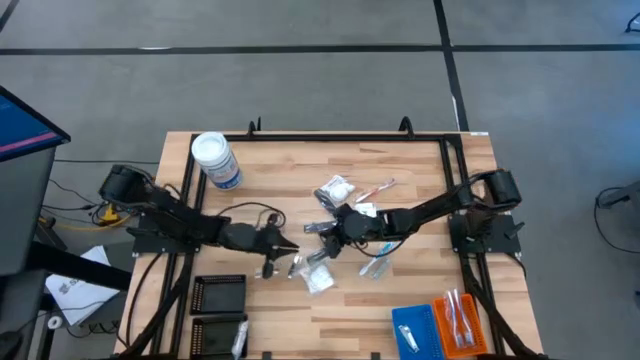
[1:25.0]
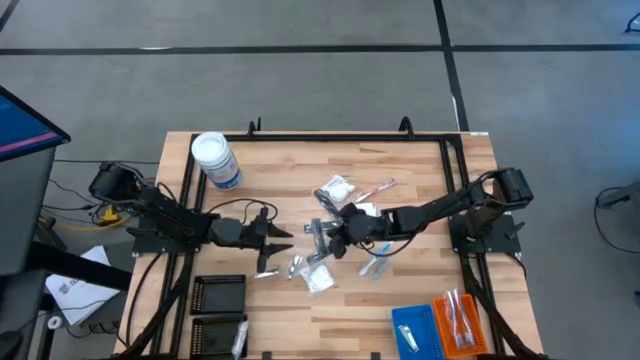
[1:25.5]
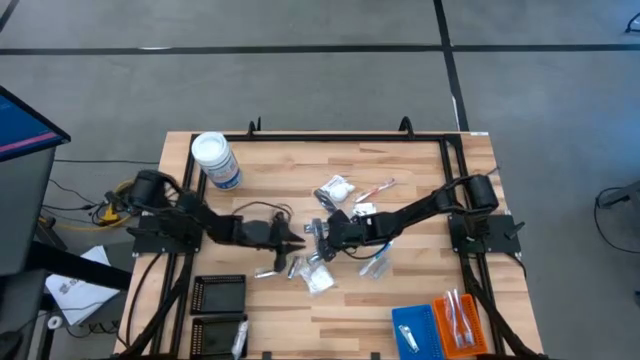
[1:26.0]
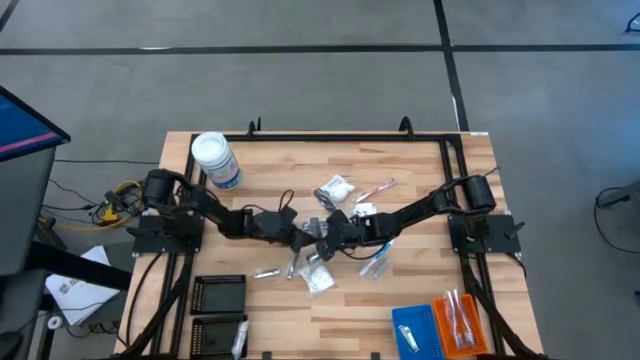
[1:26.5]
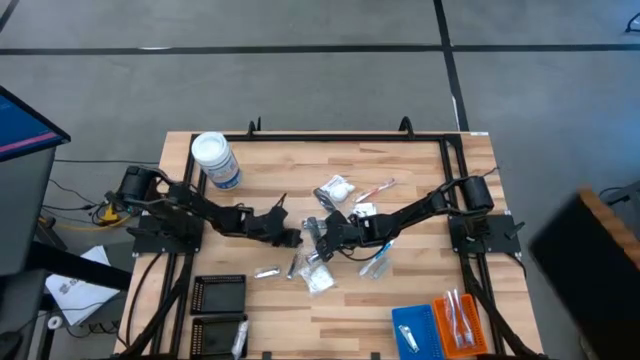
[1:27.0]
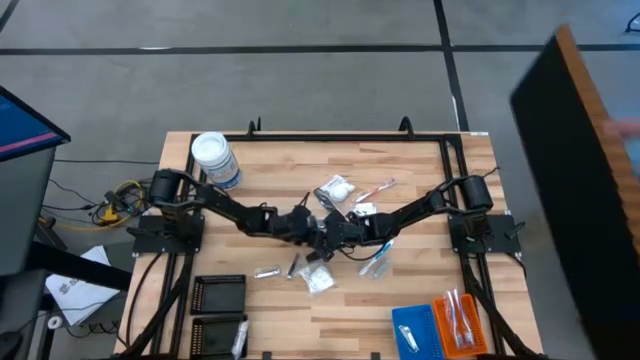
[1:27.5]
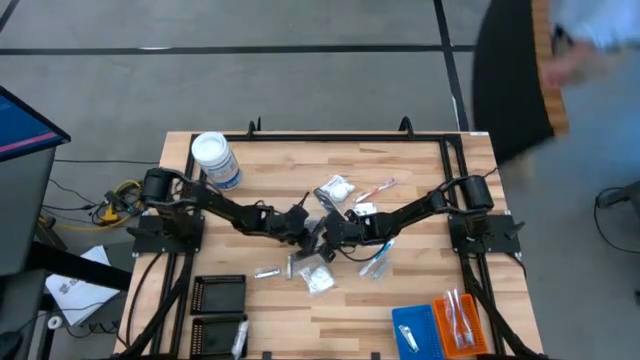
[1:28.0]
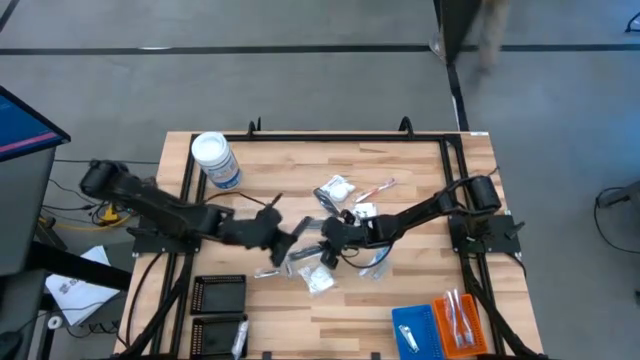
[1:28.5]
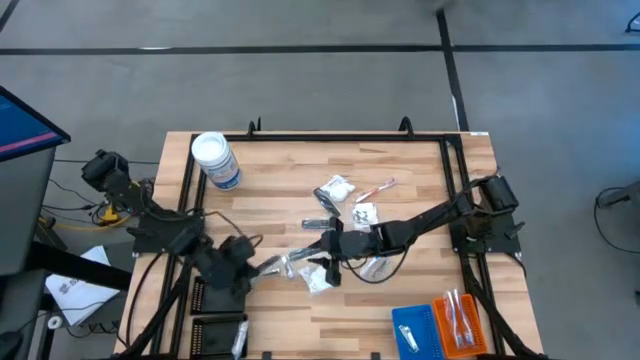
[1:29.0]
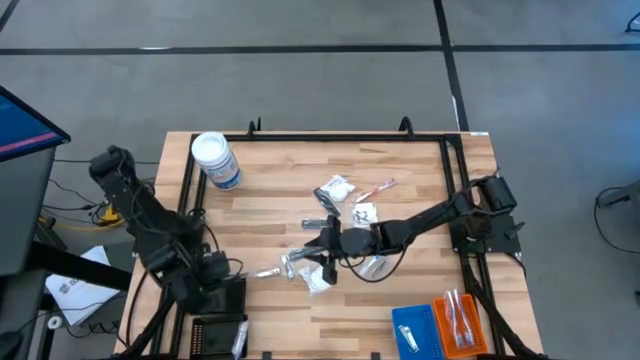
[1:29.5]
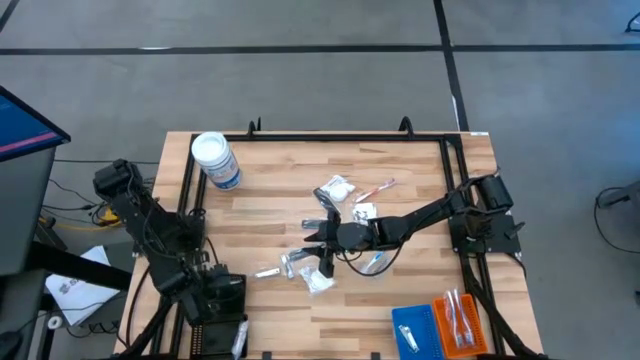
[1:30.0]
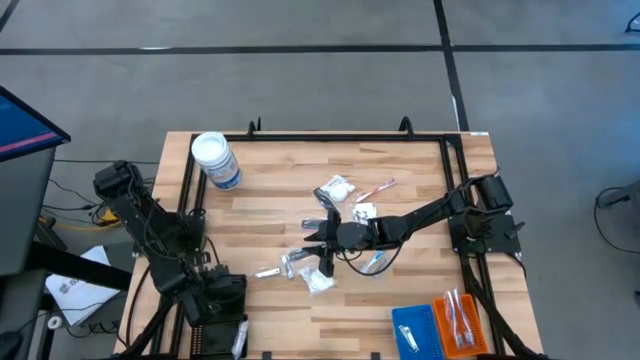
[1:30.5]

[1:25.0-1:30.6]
Task: Pick & Place Travel size toiletries
Put the black comb into the top black bin

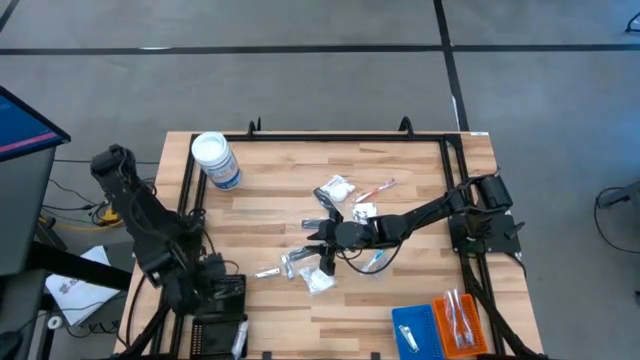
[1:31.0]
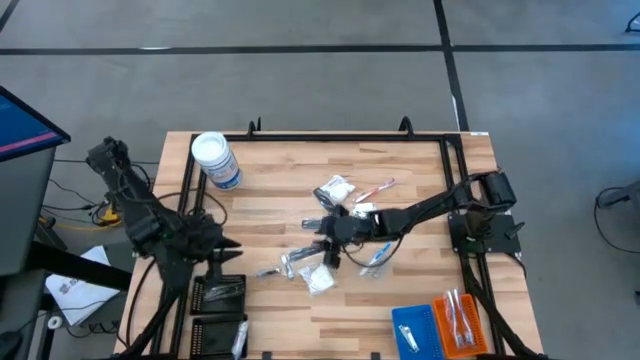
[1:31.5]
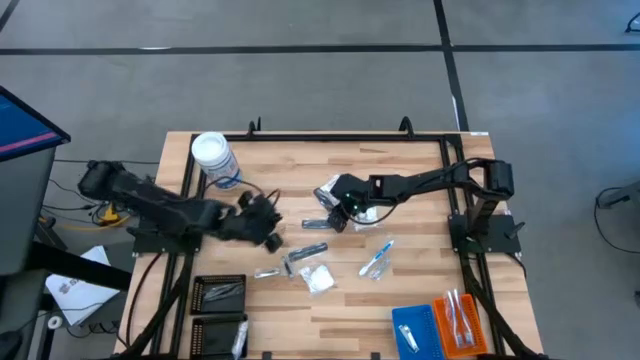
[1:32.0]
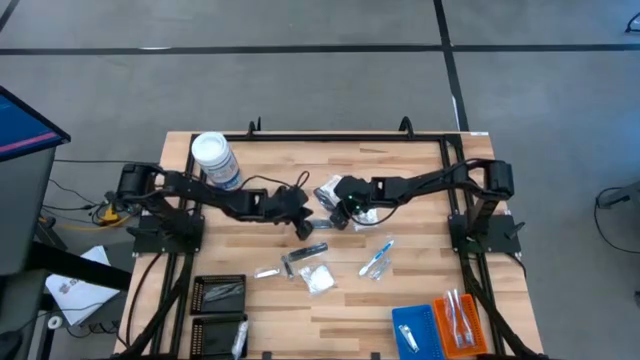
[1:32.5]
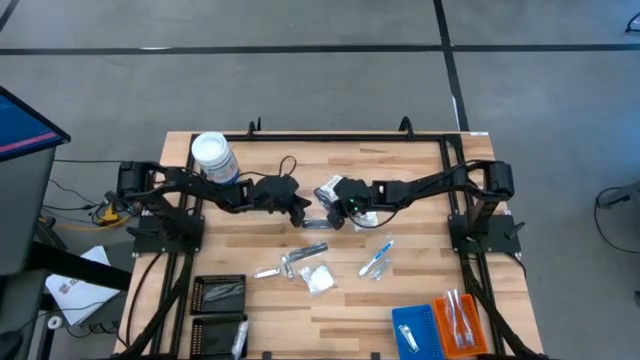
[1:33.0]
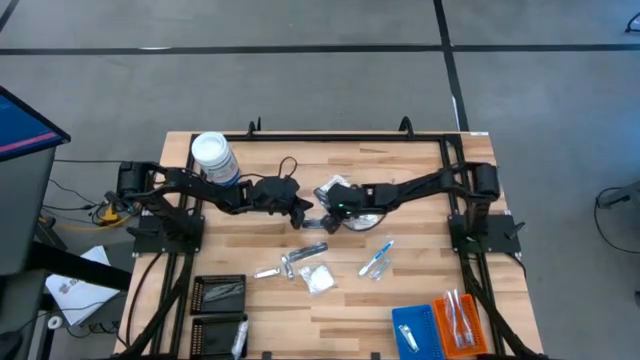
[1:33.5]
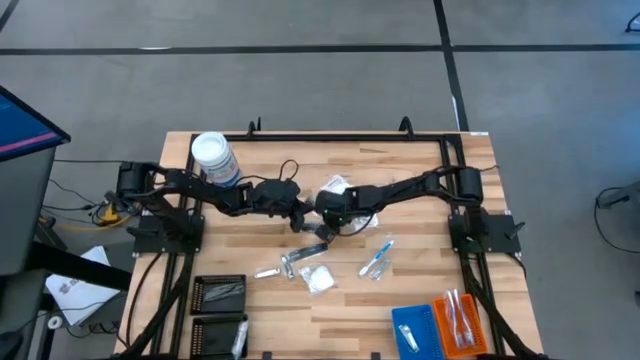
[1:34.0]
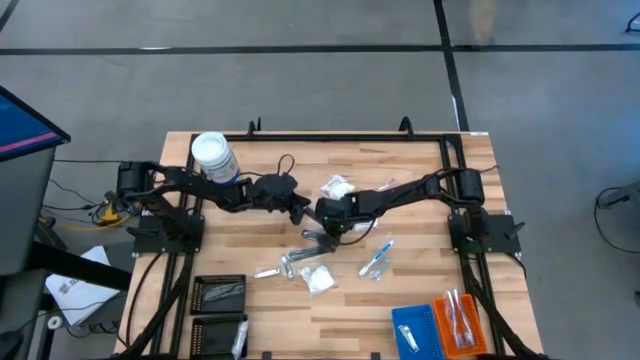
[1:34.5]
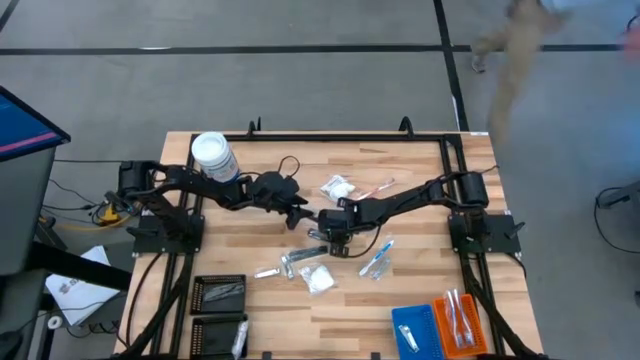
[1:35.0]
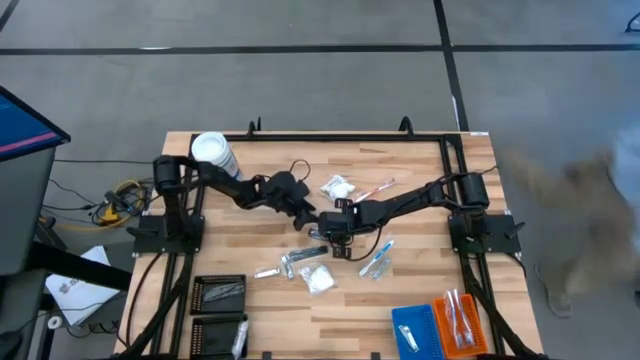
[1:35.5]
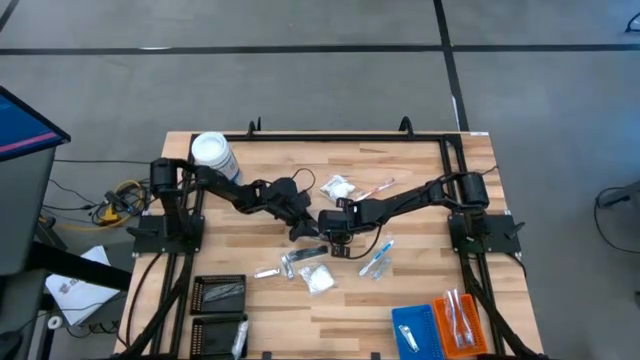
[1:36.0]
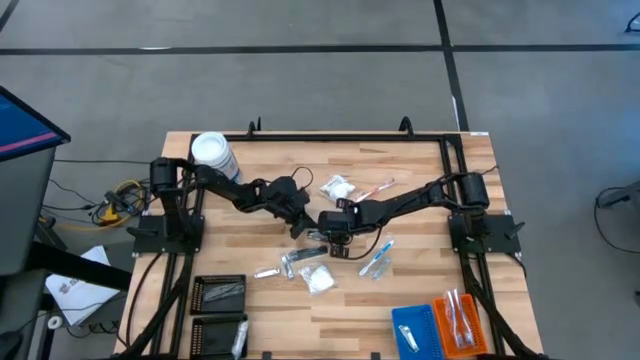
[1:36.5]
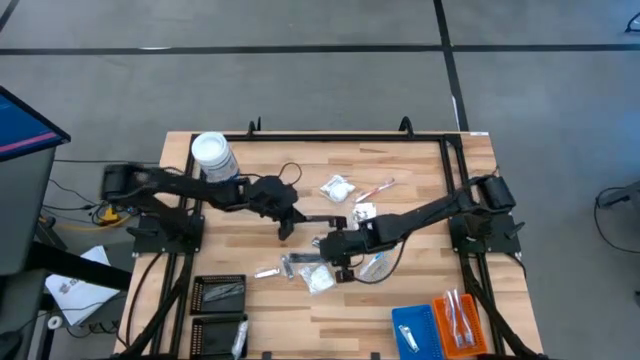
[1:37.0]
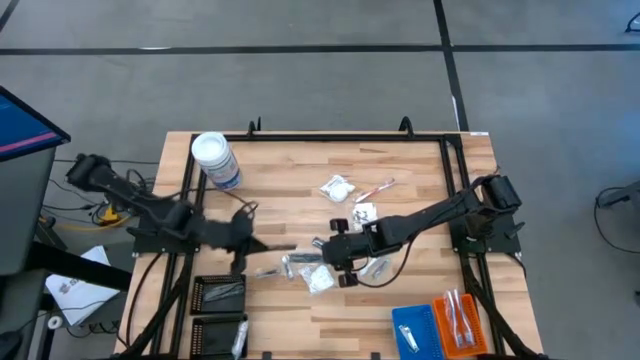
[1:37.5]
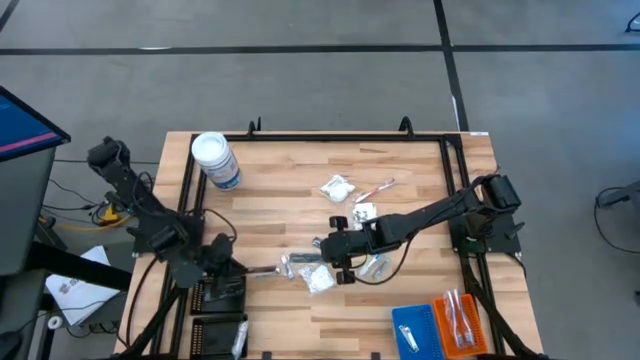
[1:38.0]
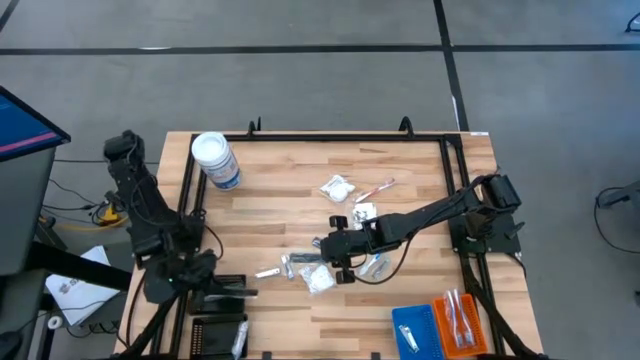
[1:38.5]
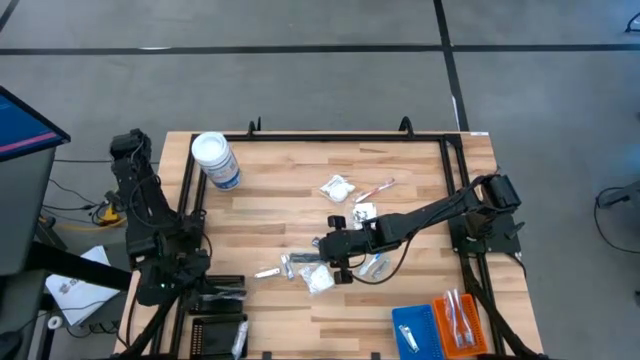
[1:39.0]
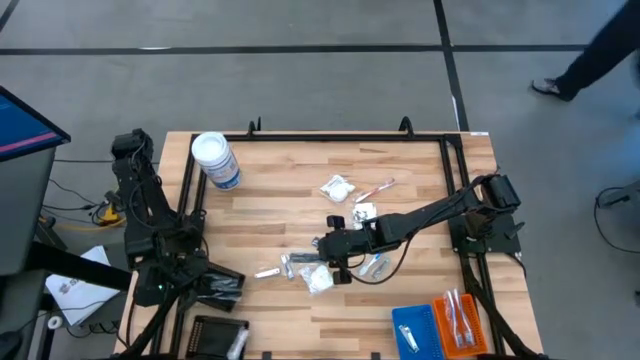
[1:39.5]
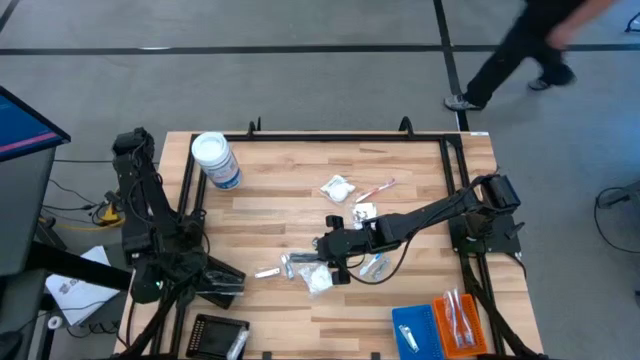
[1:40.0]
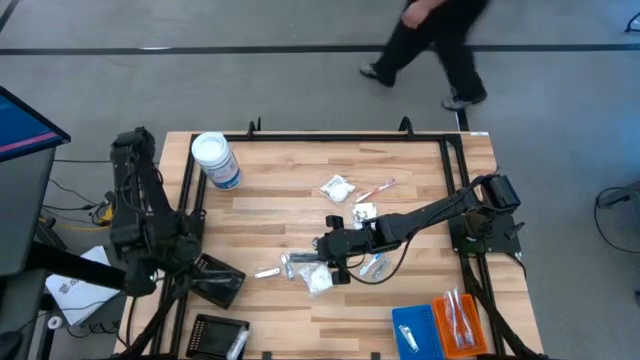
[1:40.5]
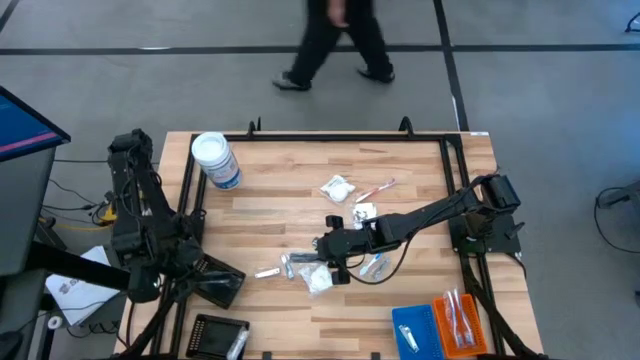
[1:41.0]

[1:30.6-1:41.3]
Put the black comb into the top black bin

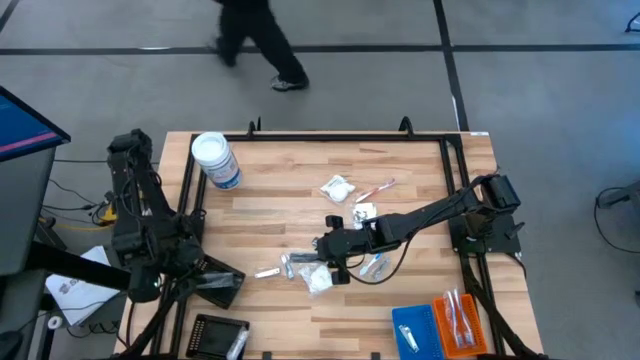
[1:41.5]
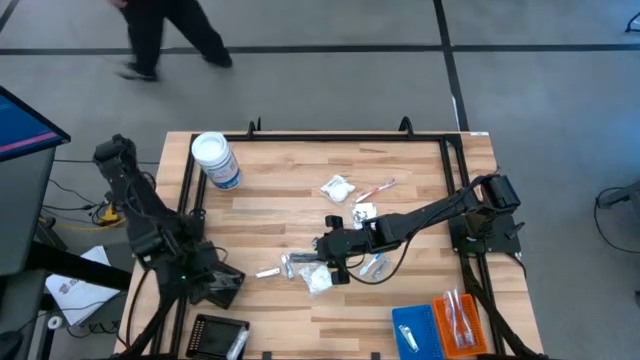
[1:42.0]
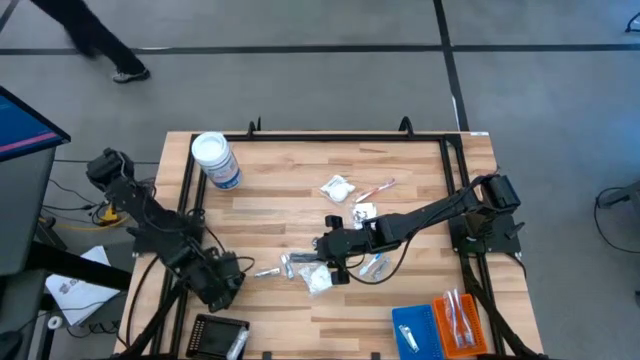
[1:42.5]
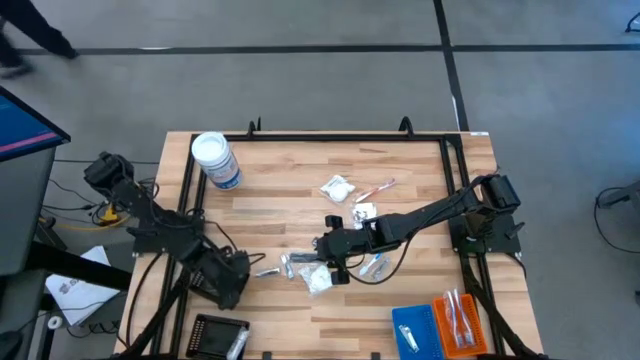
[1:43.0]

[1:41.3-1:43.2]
Adjust the top black bin

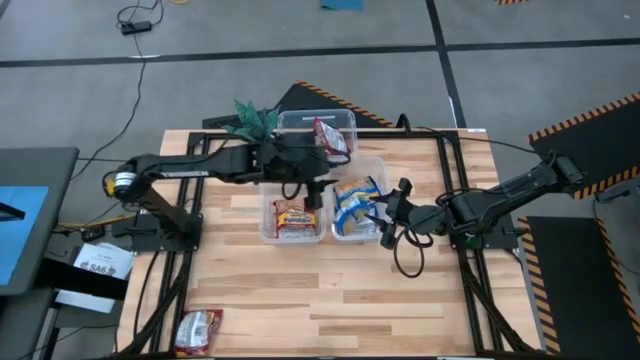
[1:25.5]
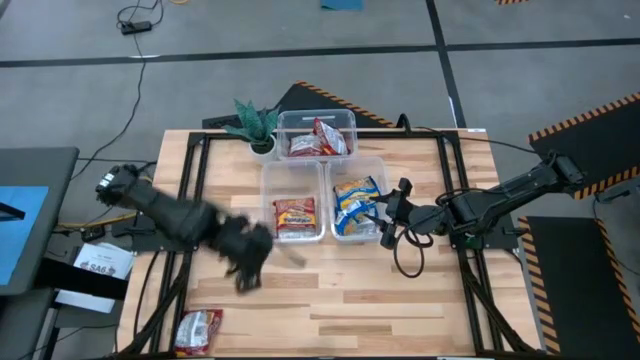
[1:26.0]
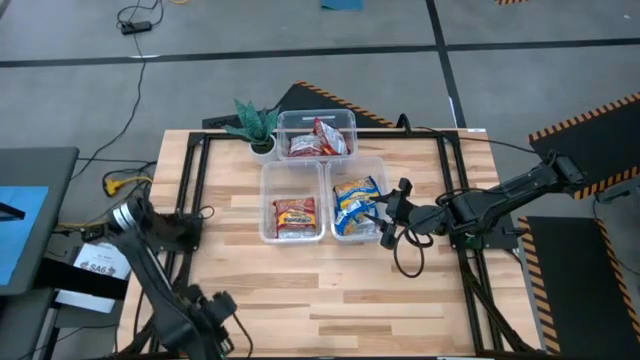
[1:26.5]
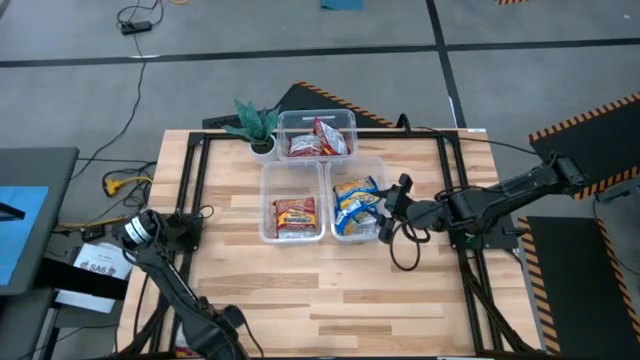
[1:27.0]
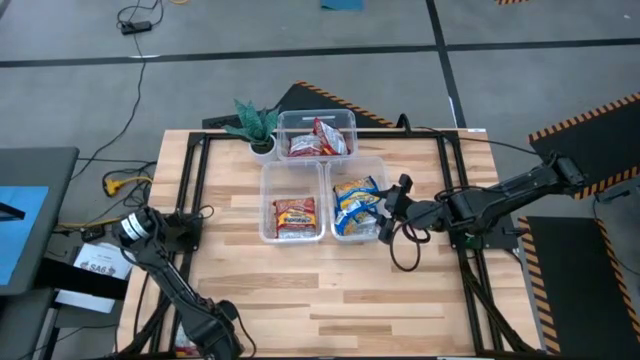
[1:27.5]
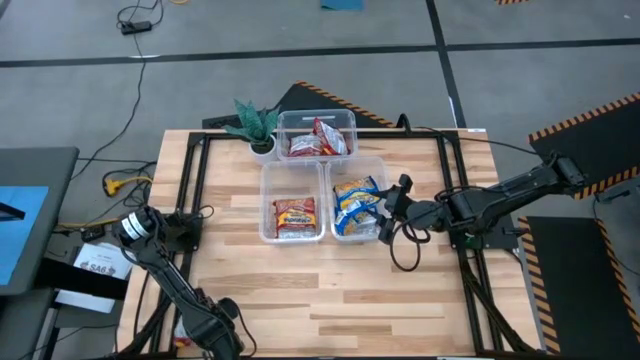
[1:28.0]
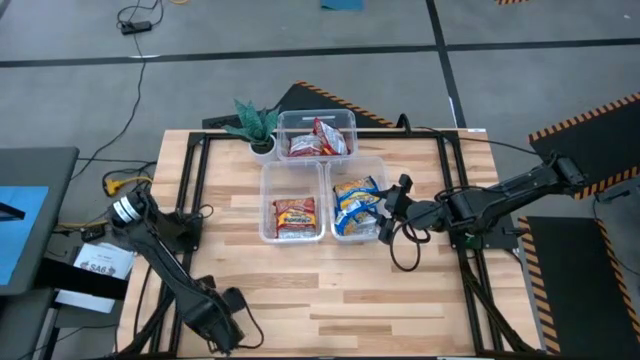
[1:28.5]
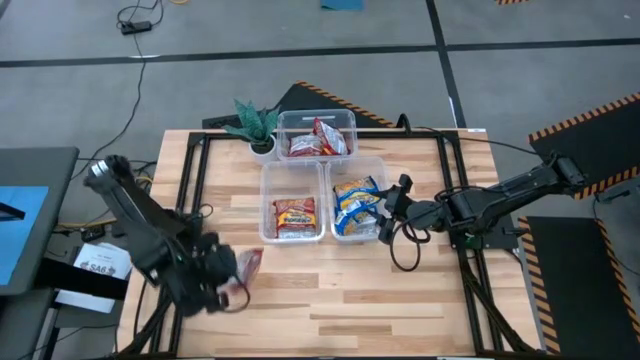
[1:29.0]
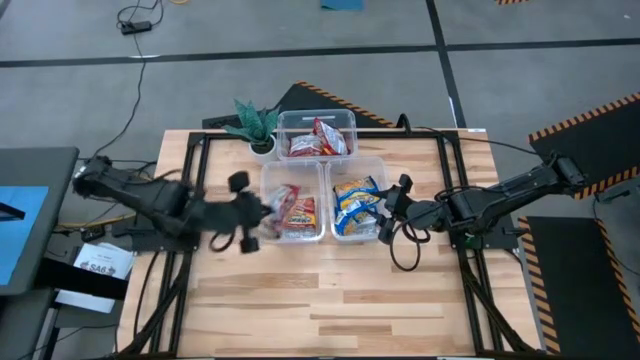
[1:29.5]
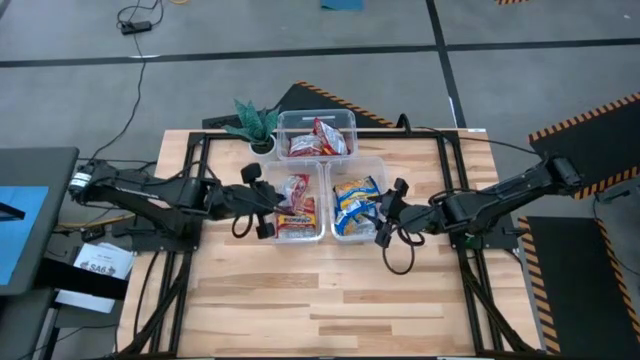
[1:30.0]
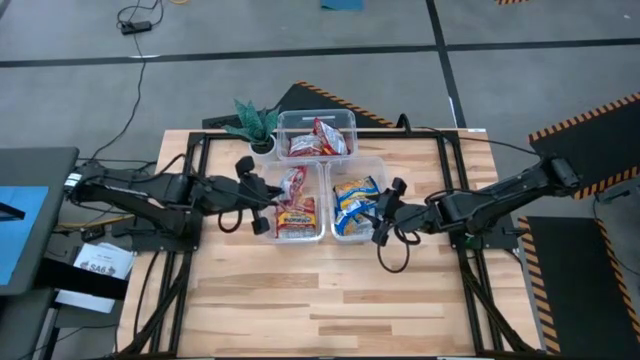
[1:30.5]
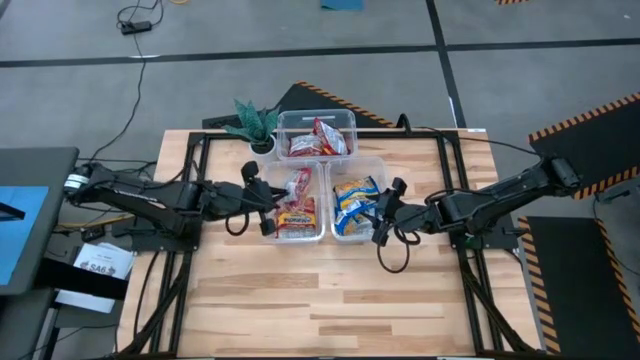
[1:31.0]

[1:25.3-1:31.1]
Task: Sort Maruchan noodles
Put the red noodle pack into the bottom left transparent bin
